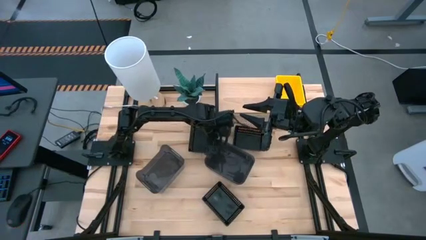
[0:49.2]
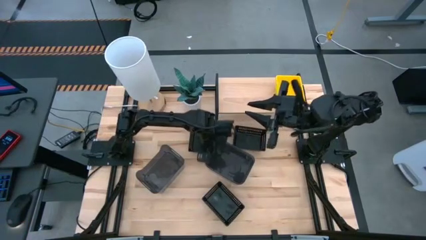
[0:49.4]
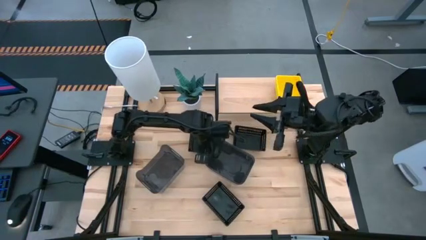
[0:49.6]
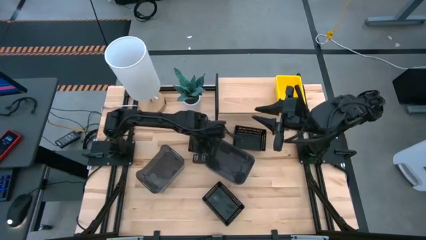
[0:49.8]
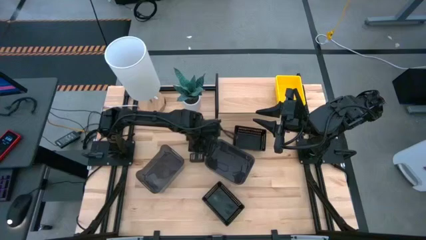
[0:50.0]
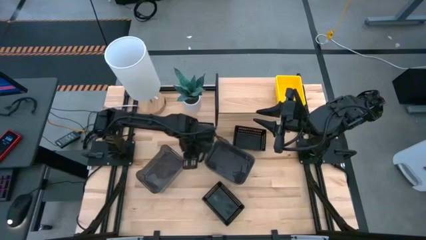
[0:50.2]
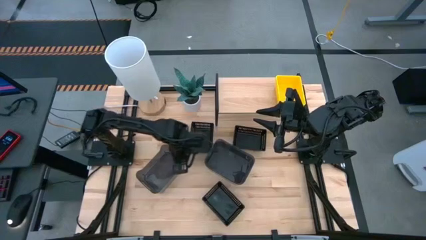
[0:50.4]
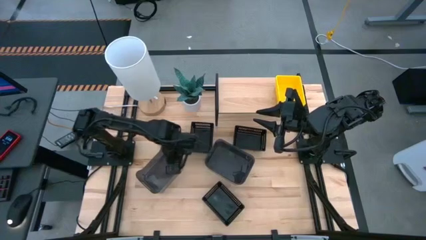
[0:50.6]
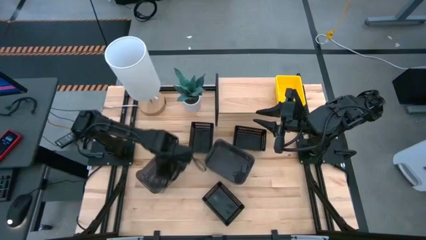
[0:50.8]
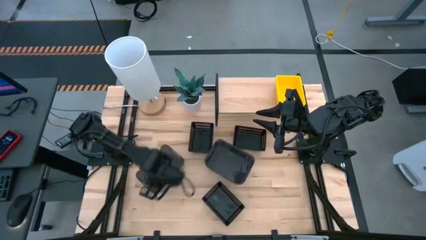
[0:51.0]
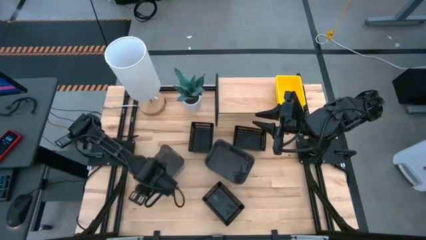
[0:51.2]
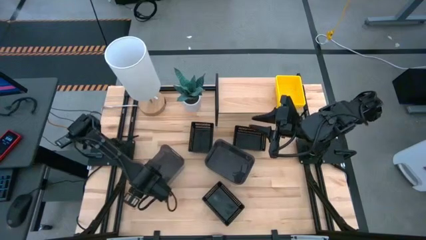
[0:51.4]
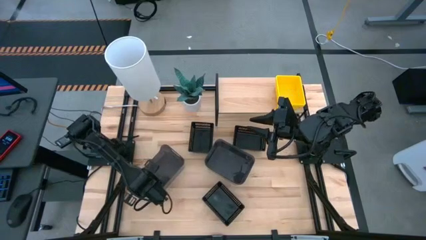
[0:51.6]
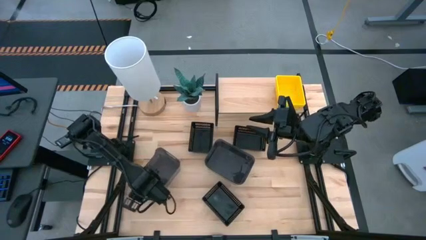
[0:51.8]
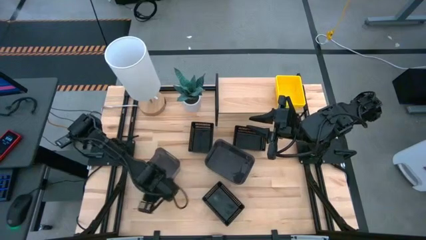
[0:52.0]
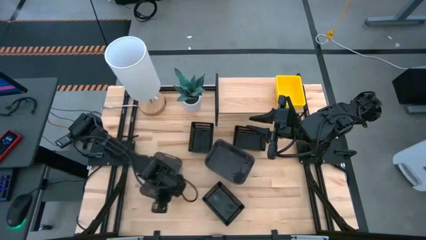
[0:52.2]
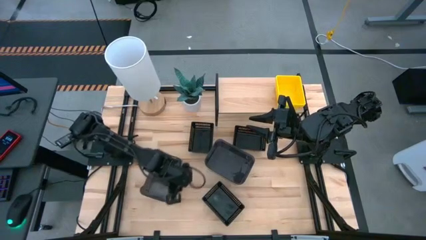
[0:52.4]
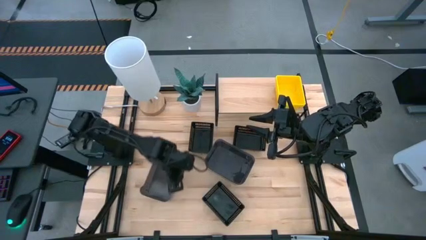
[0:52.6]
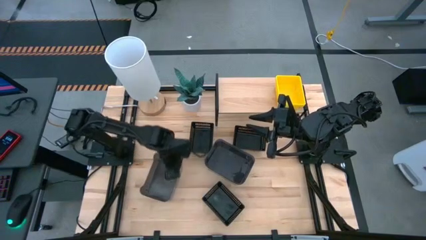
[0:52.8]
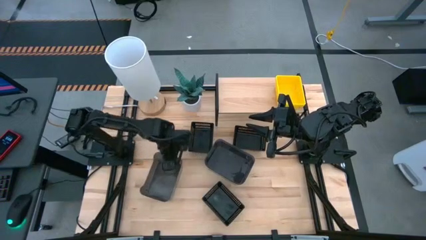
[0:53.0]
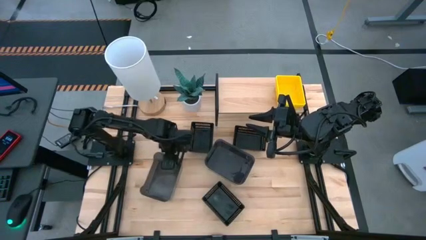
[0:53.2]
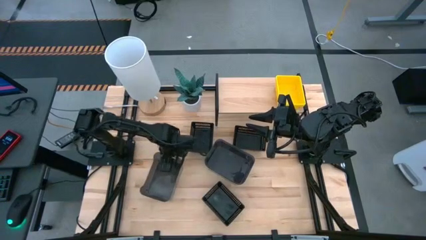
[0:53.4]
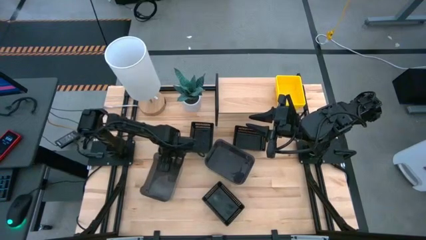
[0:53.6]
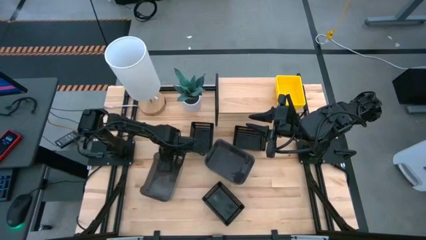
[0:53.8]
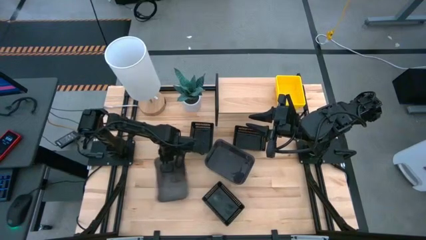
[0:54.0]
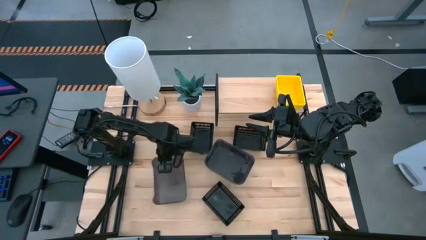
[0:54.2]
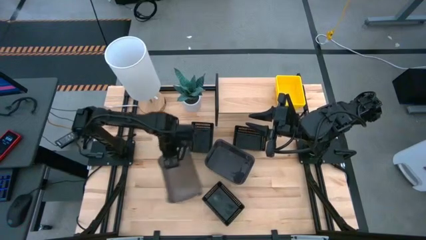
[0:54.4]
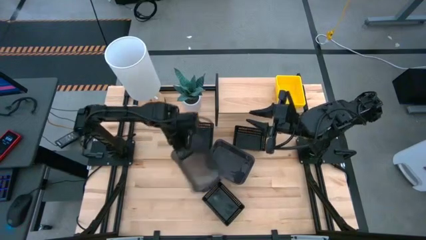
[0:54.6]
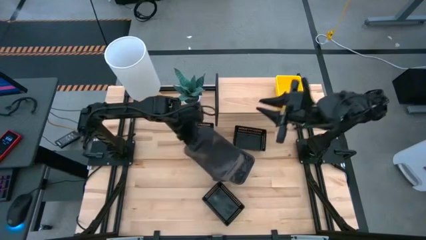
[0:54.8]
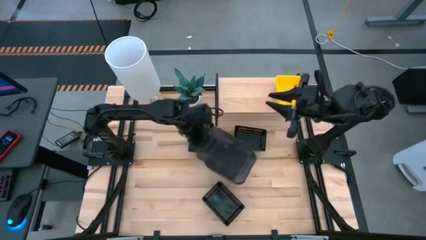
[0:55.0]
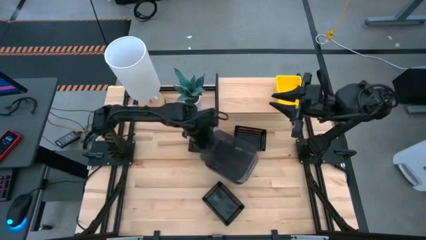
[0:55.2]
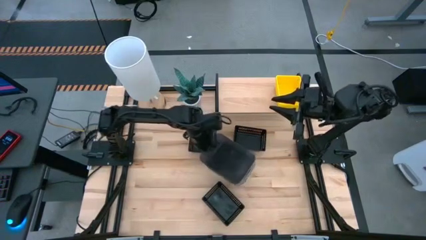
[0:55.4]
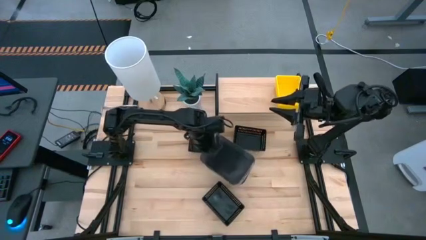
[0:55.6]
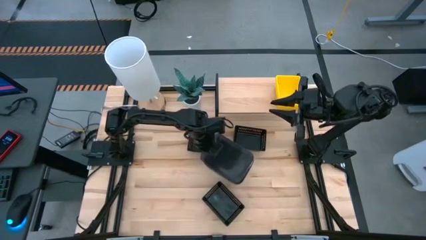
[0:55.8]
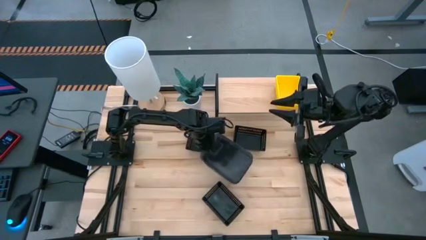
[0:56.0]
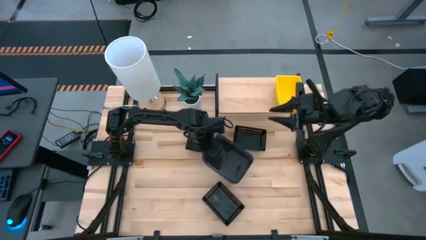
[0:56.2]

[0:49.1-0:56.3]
Task: Stack baskets on shelf by color
Stack the left gray bin on top of the right gray stacked bins

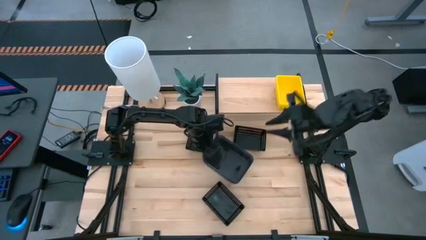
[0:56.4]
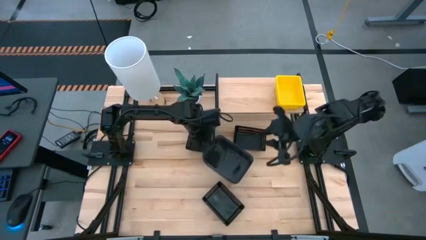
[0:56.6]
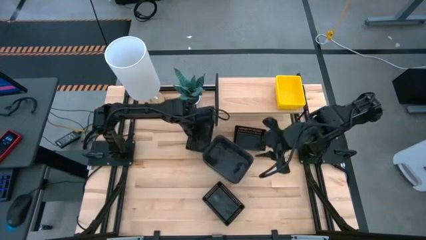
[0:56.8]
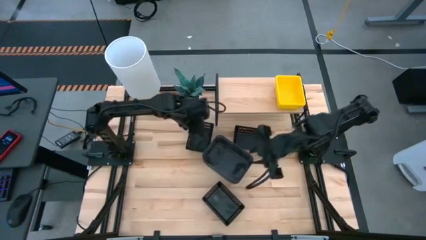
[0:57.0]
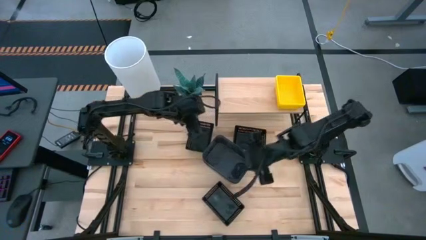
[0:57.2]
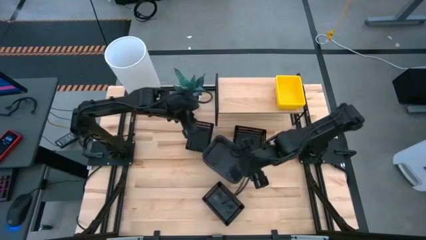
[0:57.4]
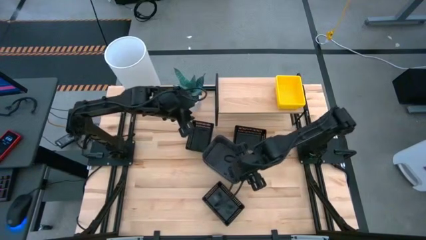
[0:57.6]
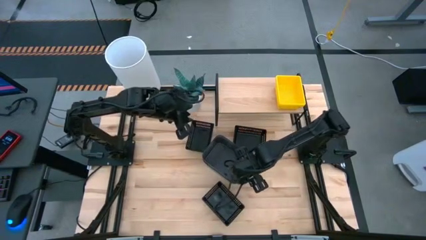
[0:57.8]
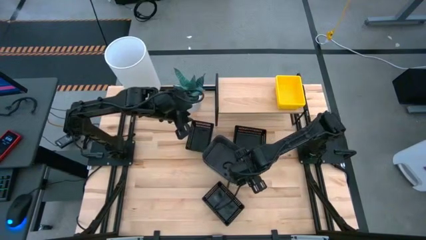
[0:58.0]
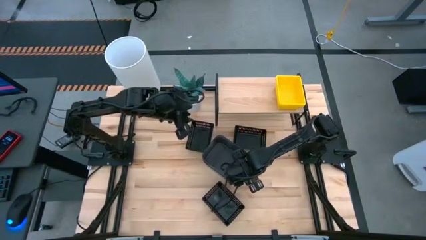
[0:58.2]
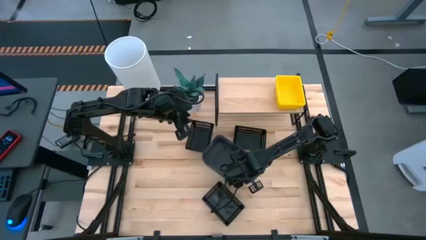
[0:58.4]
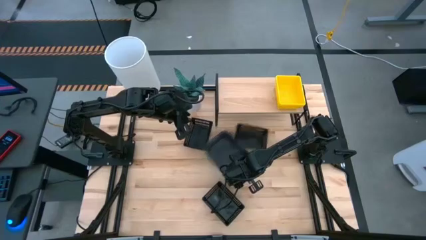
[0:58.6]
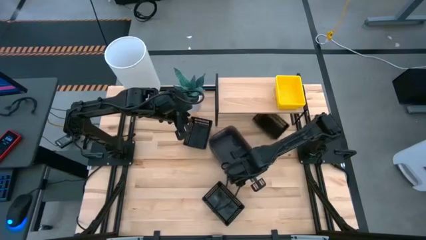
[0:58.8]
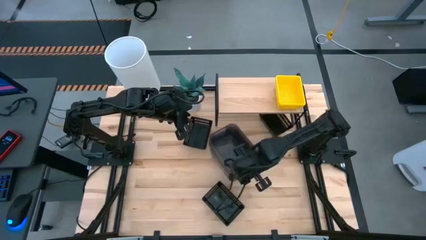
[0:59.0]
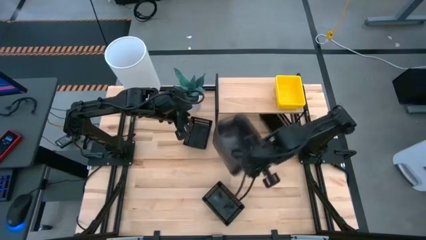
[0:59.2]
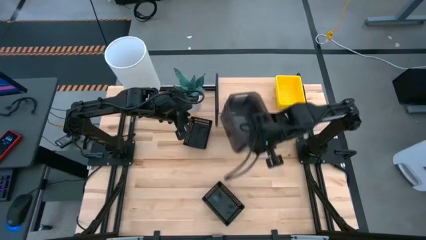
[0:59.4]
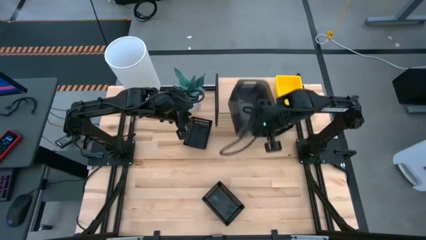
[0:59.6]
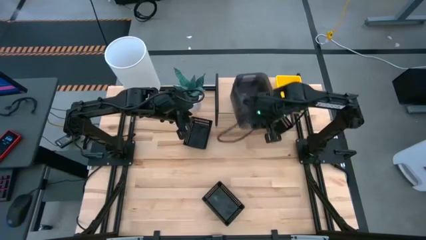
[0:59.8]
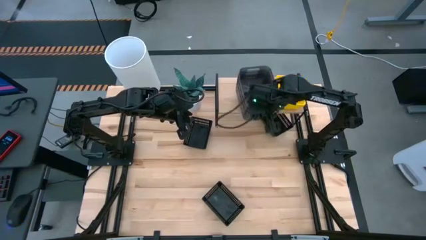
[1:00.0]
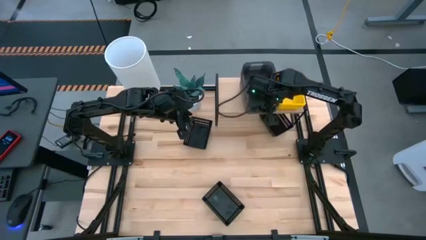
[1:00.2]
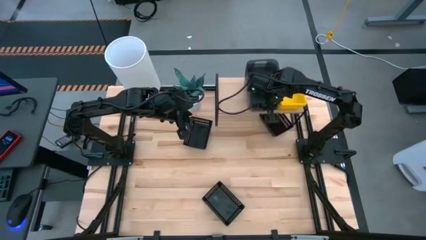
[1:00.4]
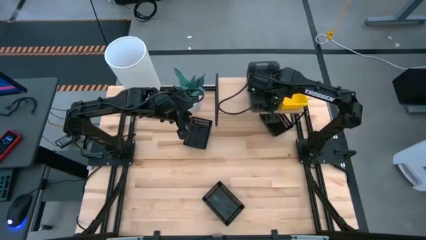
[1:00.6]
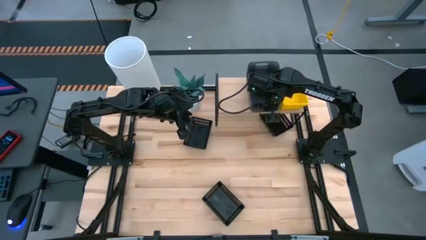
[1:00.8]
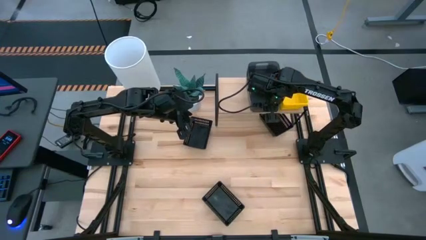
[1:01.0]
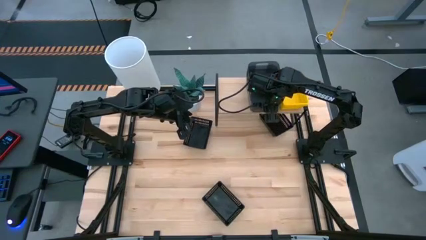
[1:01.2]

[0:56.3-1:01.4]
Put the stacked gray bins on the shelf

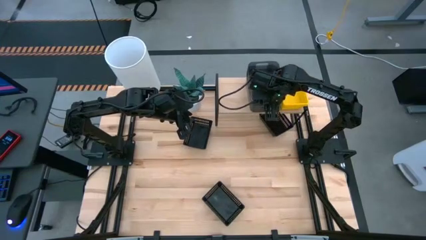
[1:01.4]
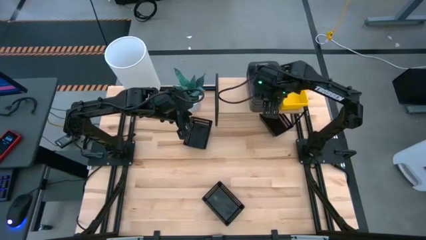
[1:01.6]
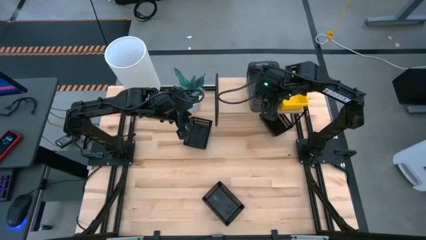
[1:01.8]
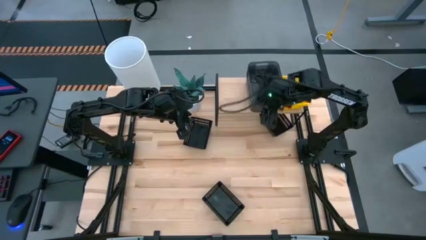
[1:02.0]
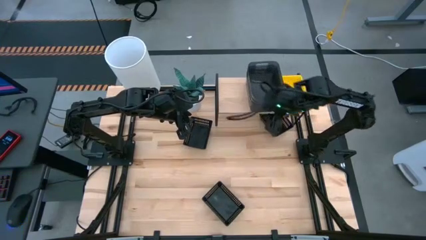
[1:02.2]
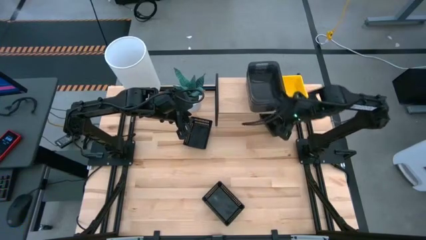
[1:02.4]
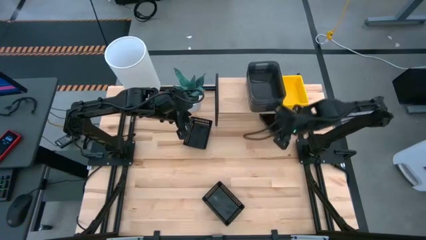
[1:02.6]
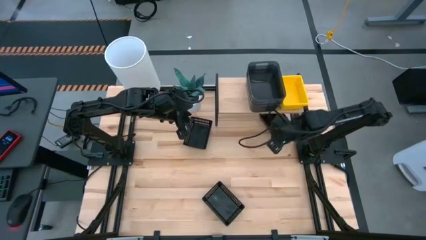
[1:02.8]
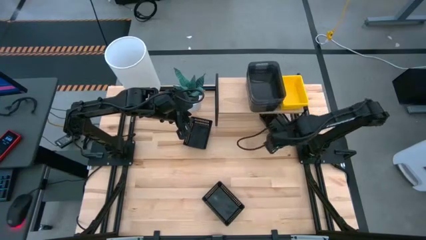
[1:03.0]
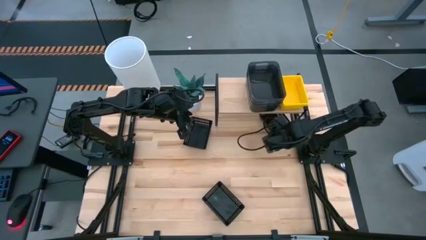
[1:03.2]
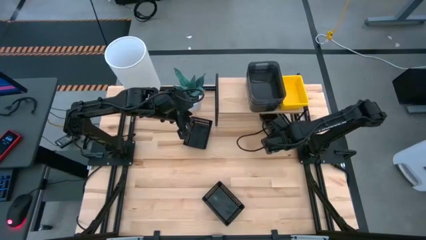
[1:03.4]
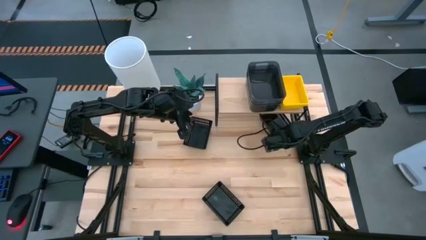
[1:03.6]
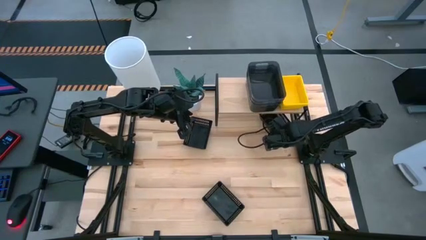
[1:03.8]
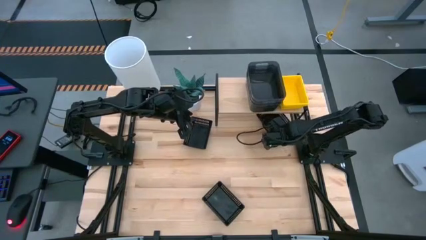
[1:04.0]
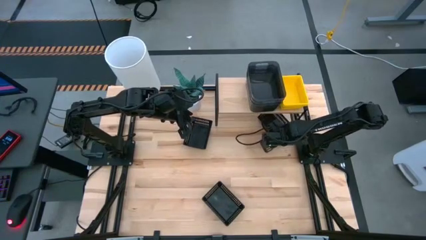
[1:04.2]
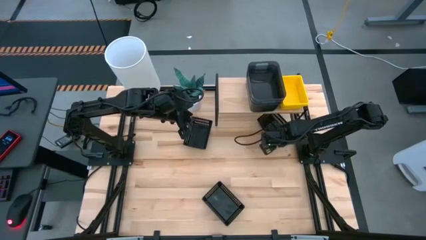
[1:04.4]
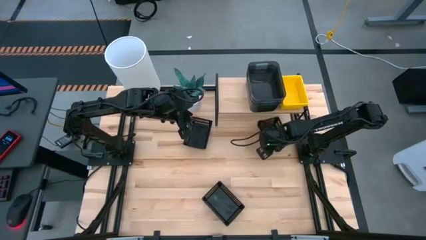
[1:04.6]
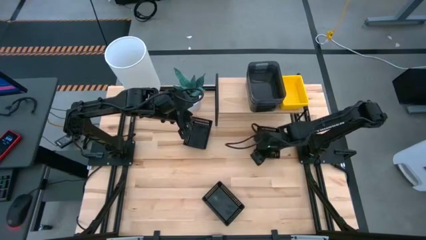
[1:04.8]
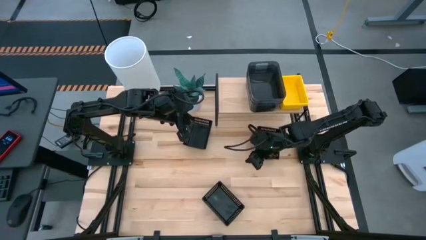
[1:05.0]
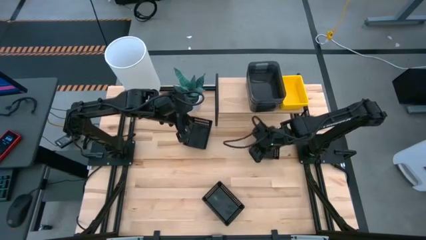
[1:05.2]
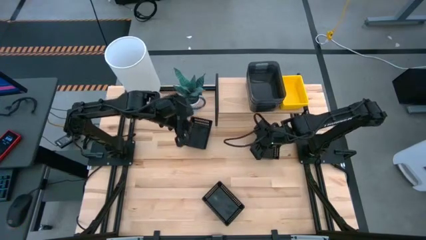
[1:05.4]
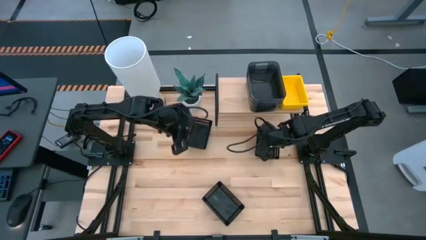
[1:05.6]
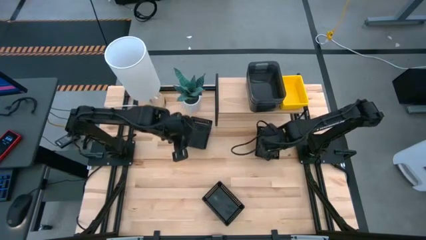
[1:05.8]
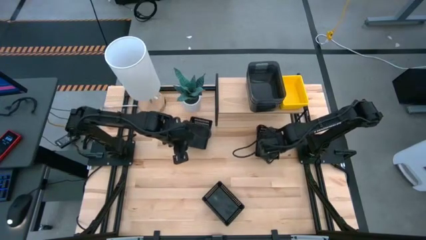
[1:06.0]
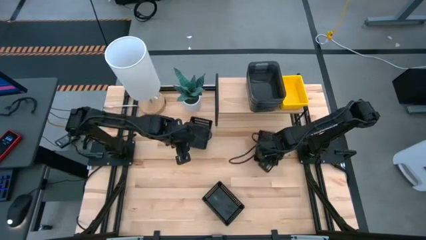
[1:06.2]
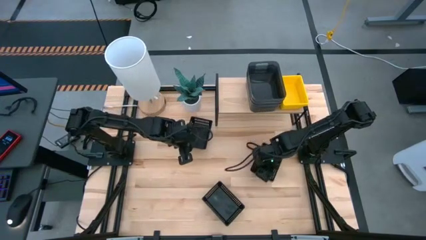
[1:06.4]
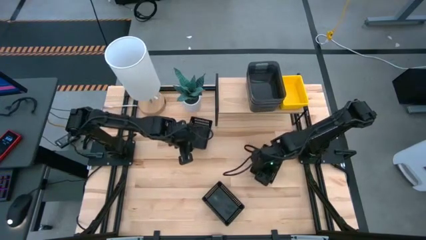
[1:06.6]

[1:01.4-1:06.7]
Adjust the black bin
